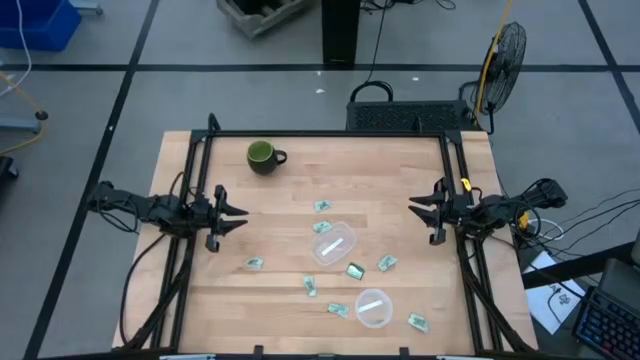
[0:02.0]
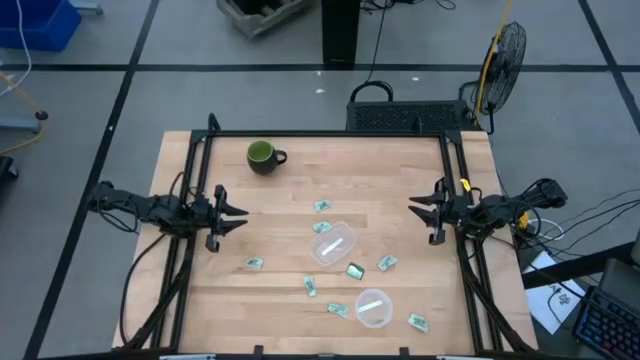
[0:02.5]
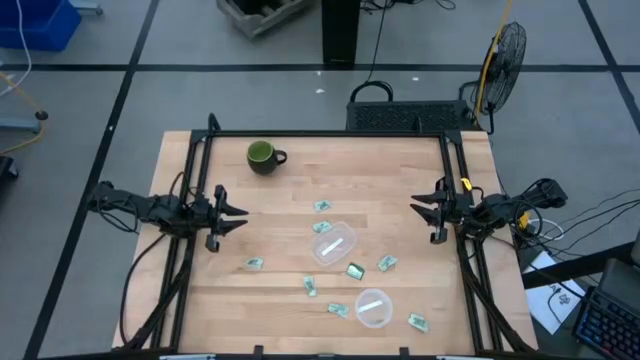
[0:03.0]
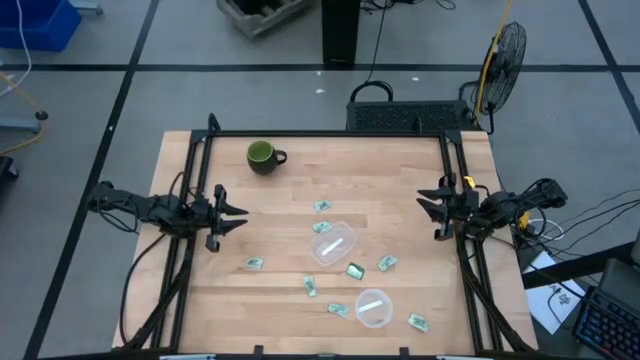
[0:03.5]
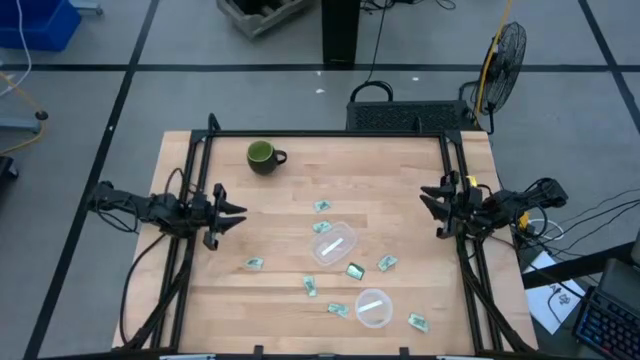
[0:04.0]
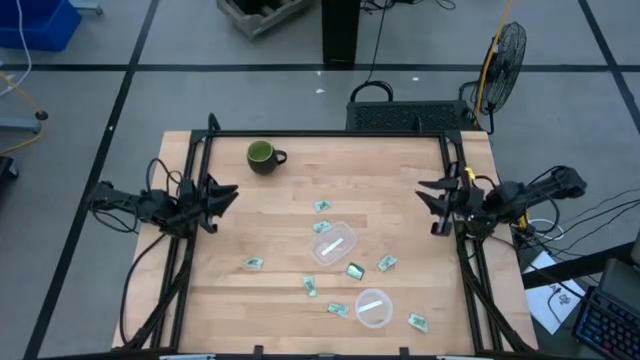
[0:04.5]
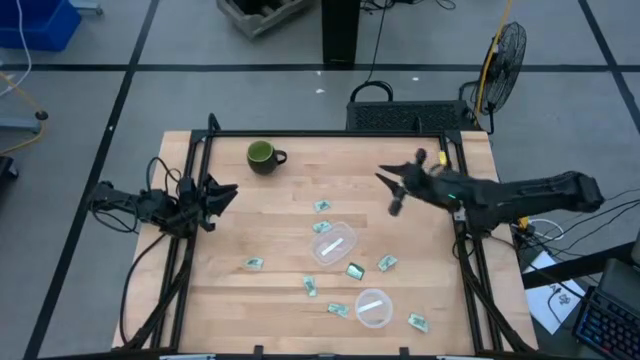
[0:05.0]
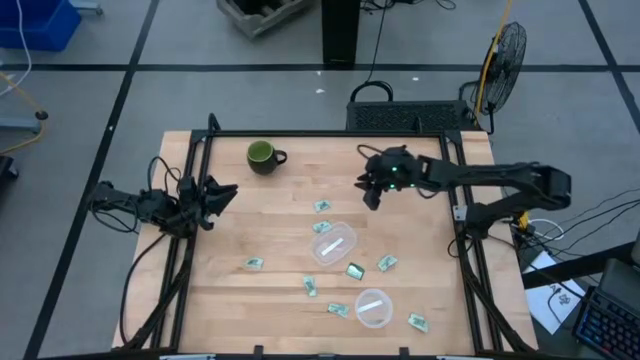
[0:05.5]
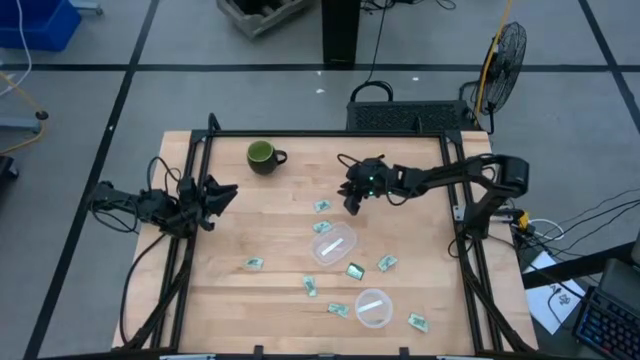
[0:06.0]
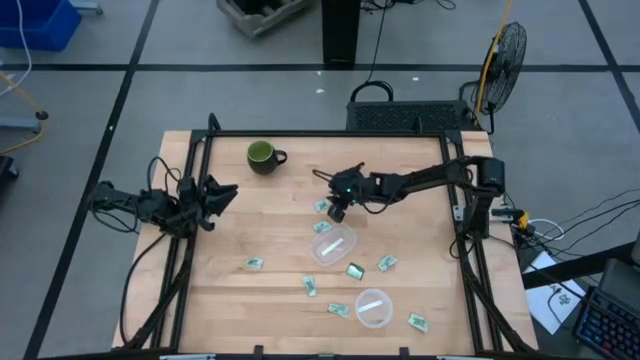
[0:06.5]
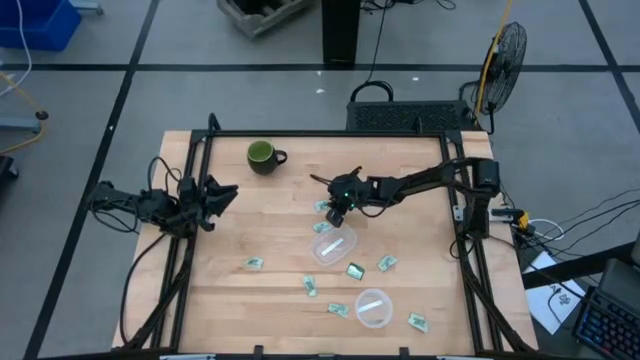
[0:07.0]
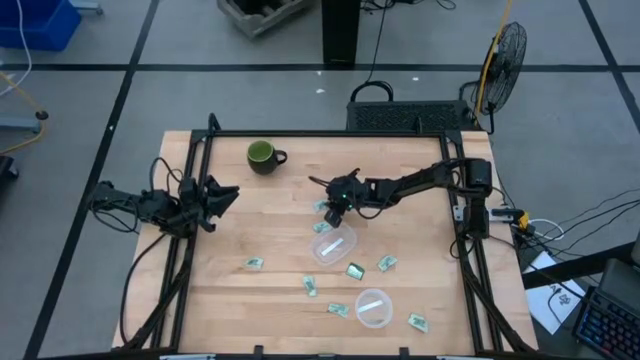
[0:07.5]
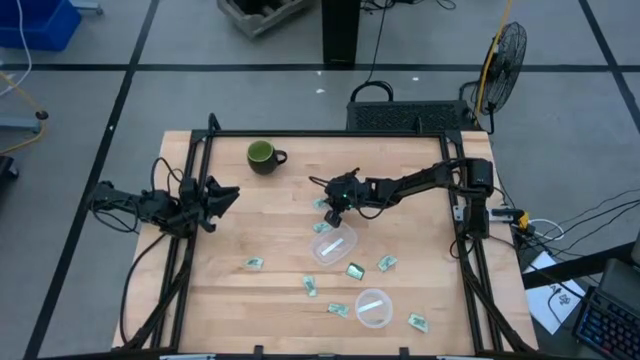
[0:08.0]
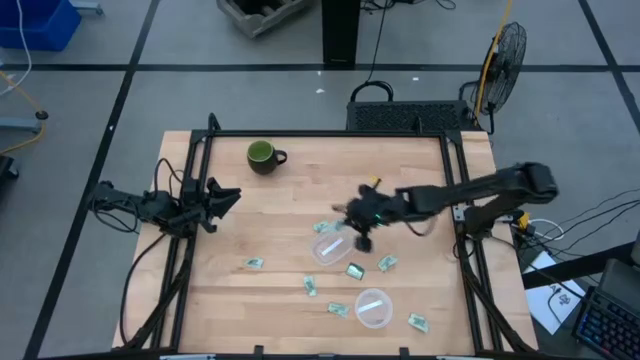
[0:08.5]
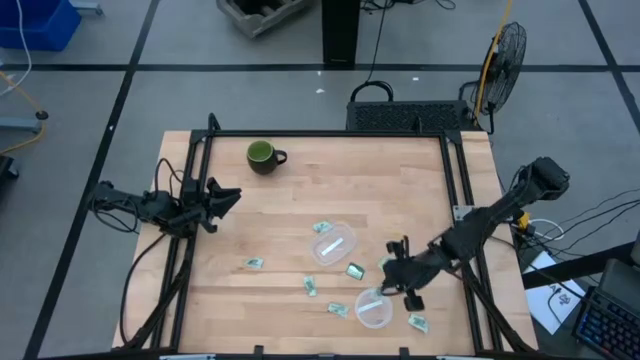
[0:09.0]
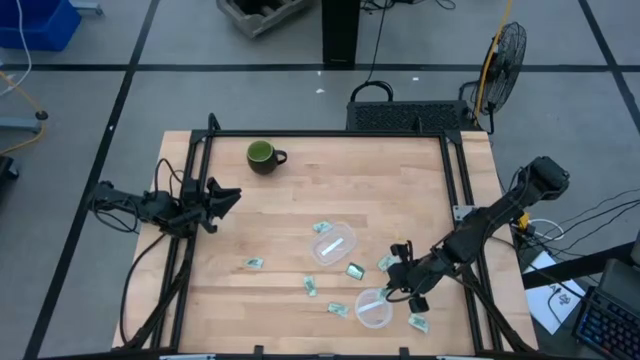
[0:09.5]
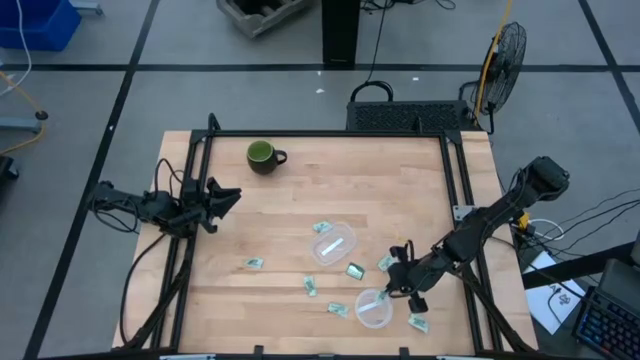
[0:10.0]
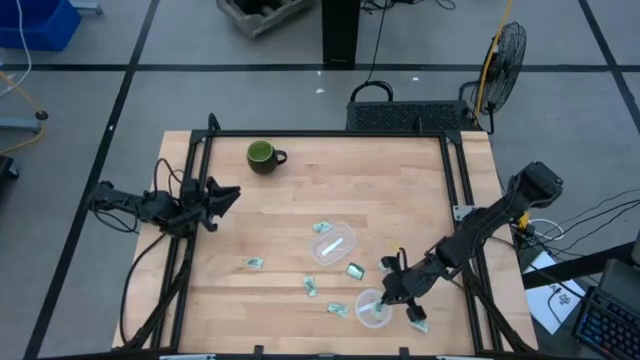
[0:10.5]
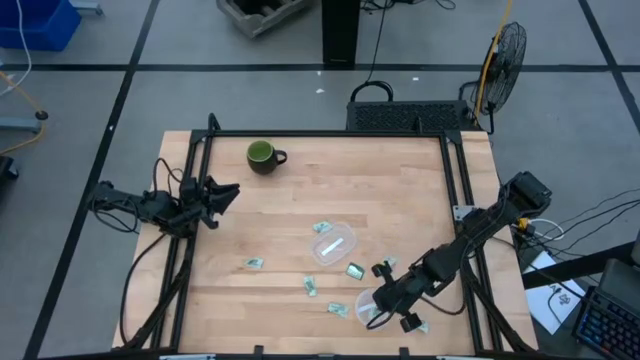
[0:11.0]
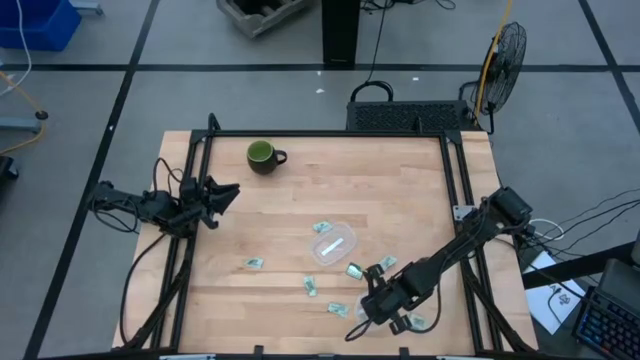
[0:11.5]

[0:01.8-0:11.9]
Task: Pick and place Stevia / Truvia into bins
Put the stevia packet into the bottom transparent container

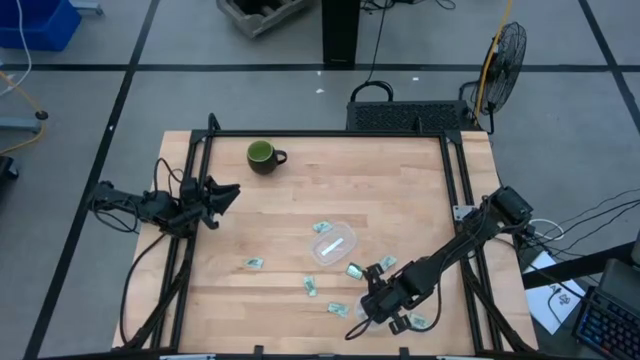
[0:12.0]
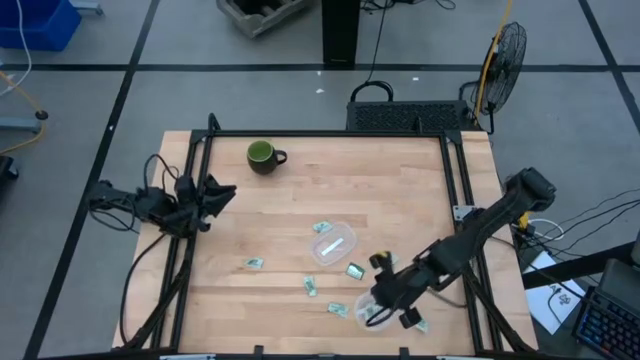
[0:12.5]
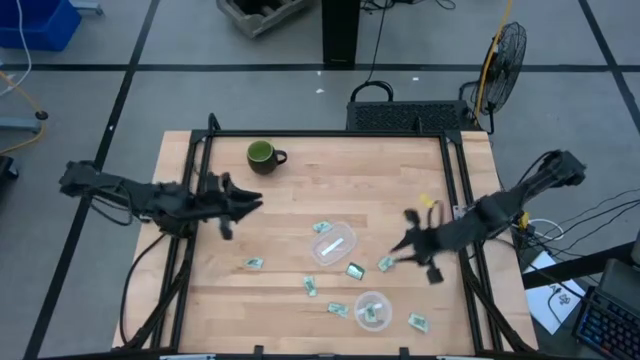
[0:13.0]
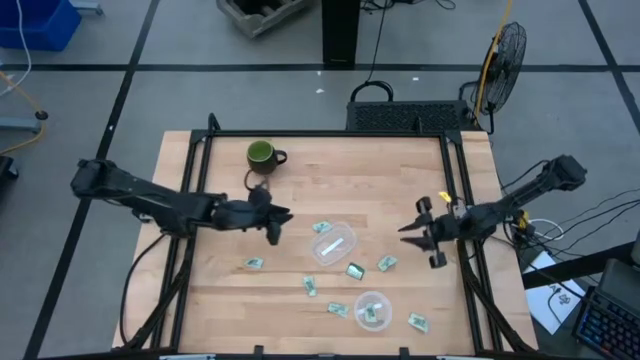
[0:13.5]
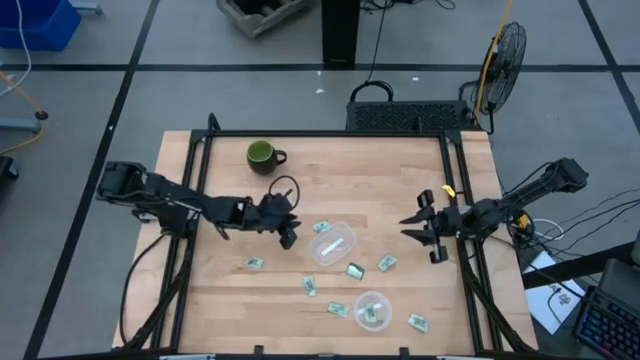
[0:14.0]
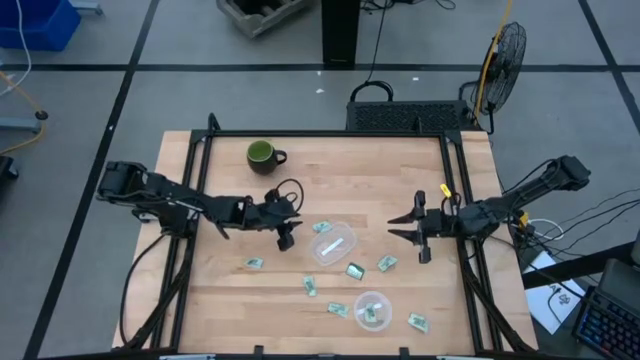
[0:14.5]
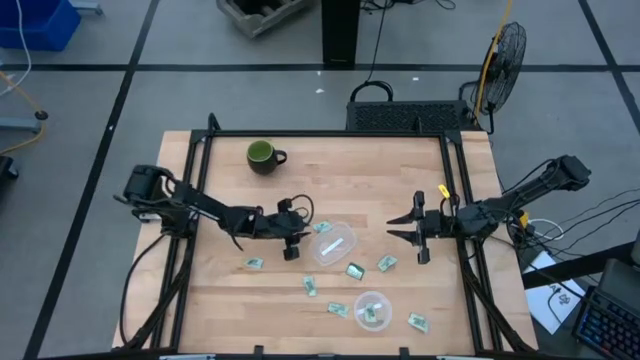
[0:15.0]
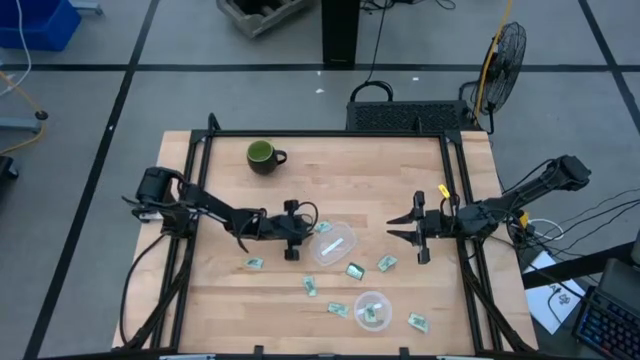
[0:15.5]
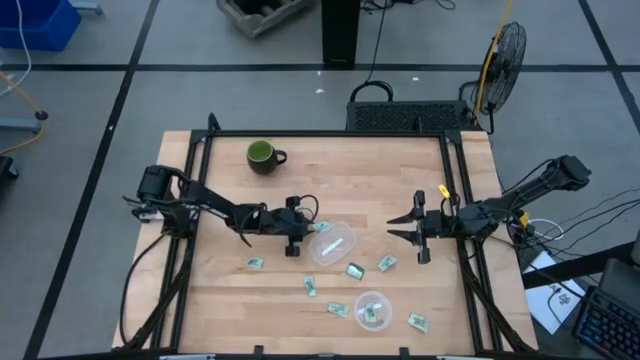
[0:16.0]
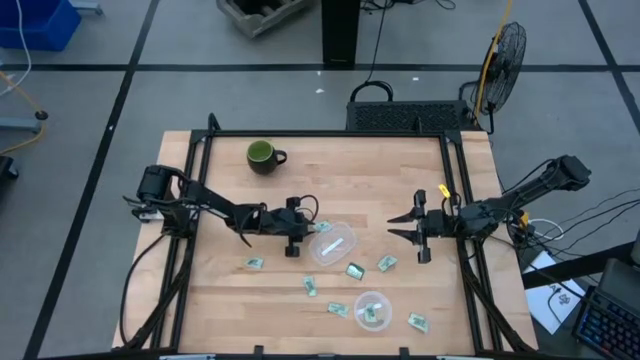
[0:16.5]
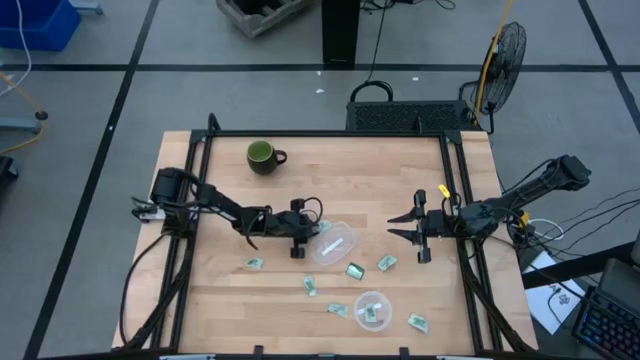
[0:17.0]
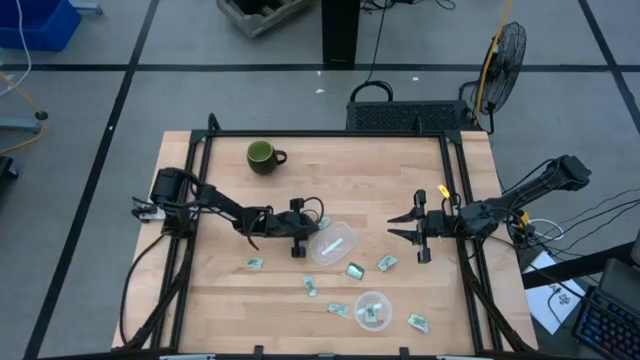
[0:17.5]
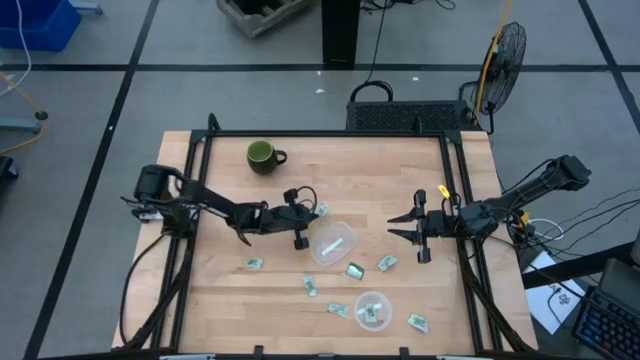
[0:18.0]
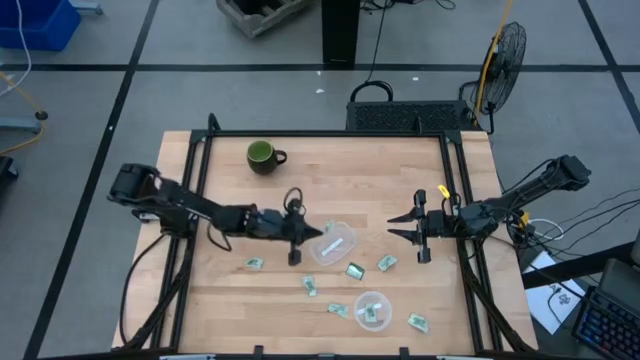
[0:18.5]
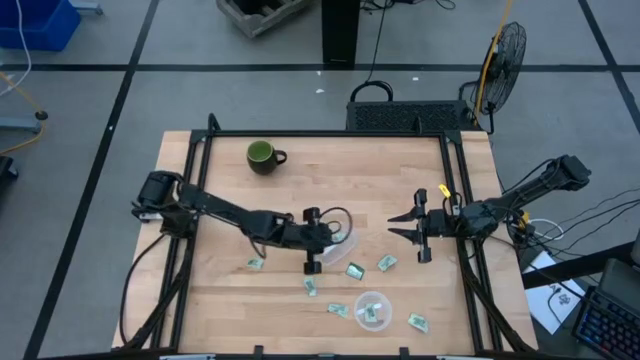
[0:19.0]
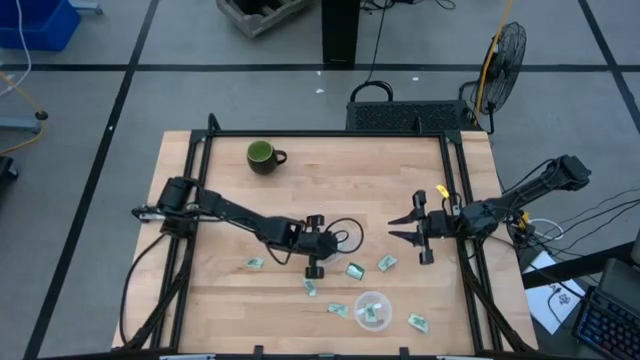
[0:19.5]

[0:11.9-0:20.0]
Put the stevia packet into the top transparent container

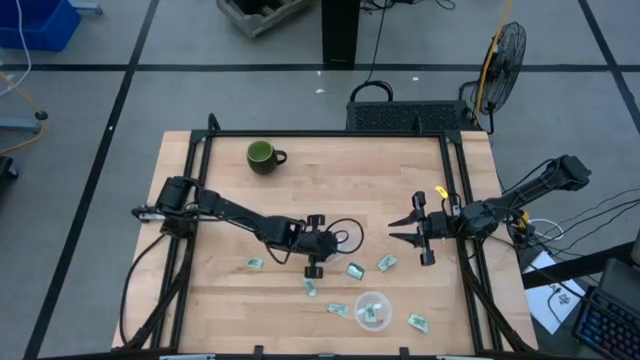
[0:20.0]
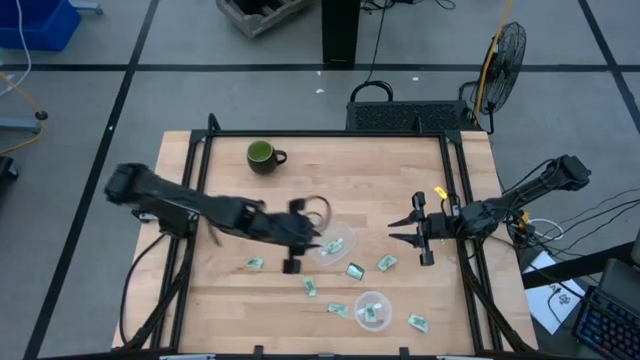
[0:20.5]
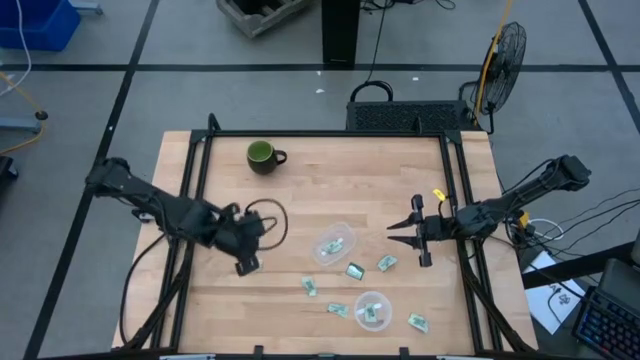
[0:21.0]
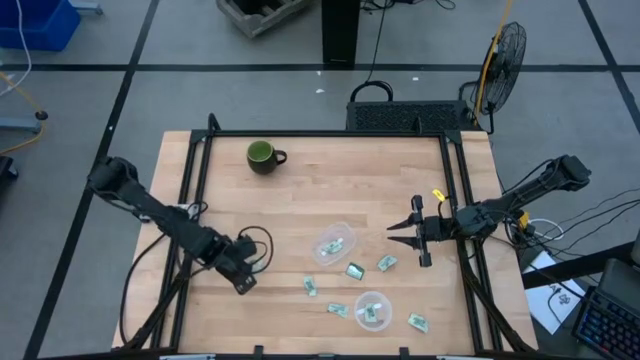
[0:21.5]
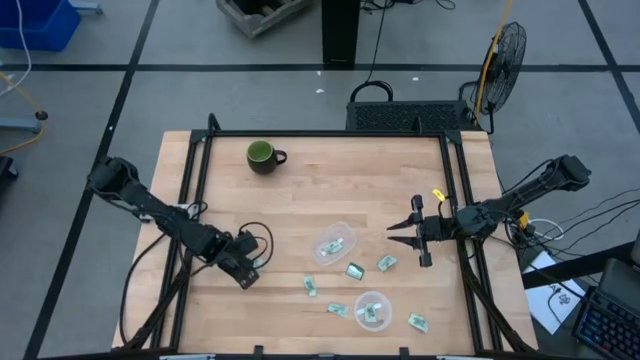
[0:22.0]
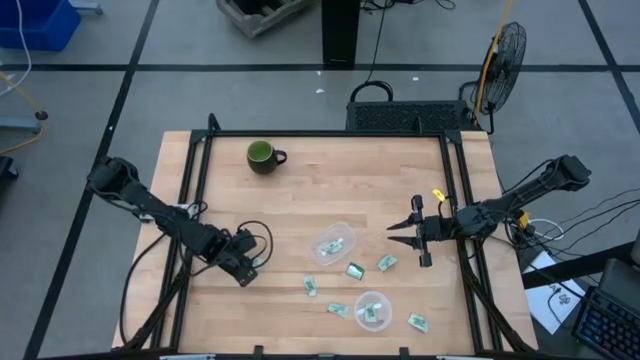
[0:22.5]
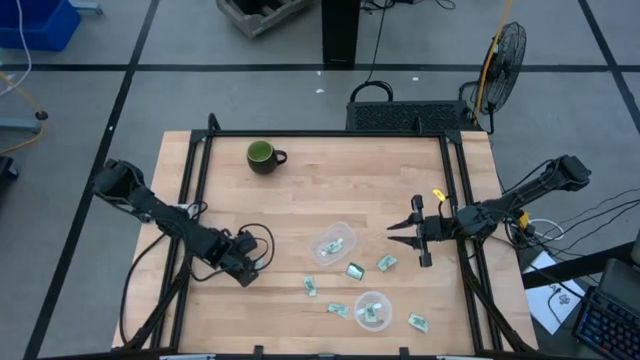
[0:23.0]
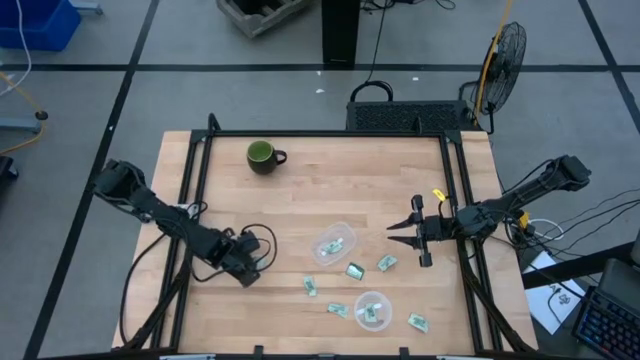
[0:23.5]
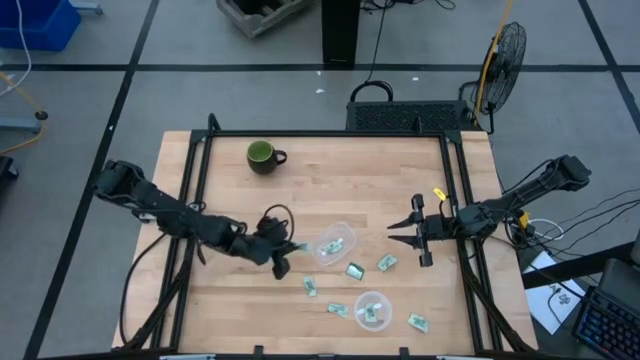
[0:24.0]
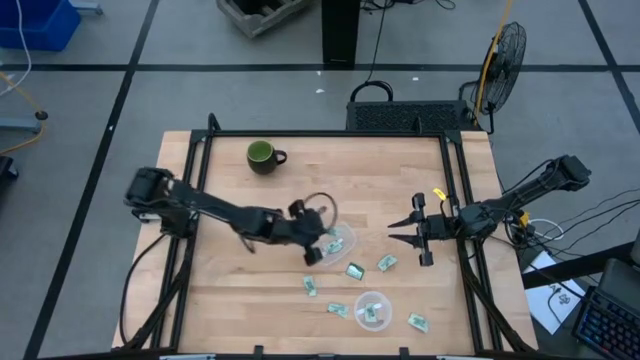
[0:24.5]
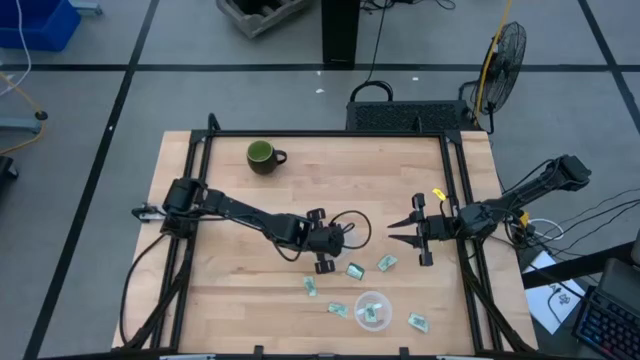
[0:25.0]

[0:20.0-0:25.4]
Put the stevia packet into the top transparent container
